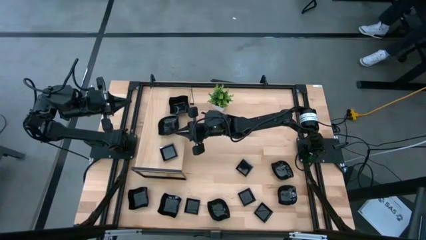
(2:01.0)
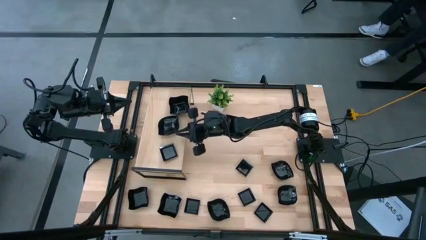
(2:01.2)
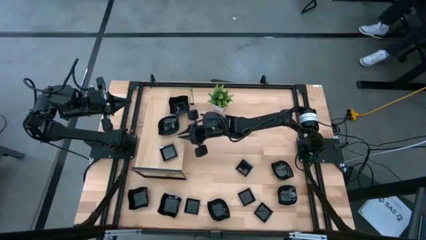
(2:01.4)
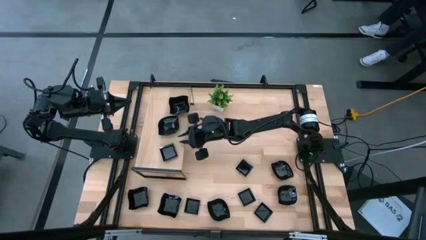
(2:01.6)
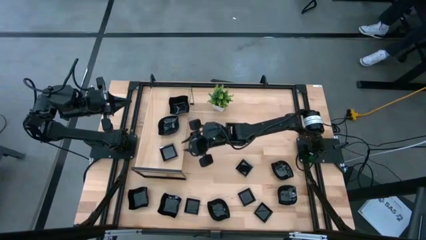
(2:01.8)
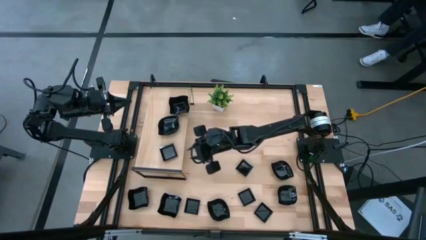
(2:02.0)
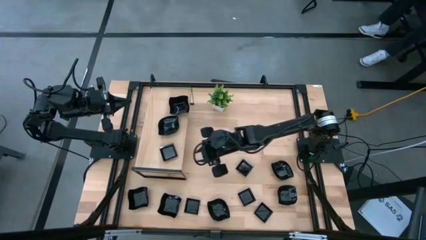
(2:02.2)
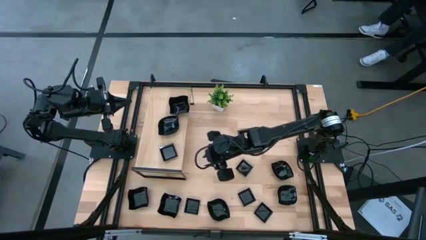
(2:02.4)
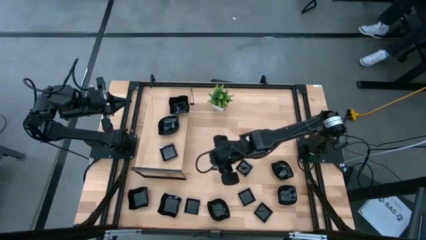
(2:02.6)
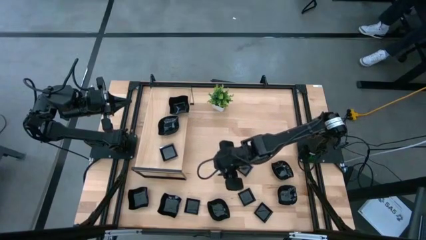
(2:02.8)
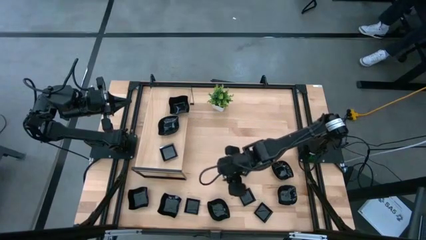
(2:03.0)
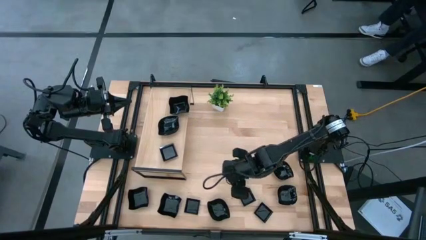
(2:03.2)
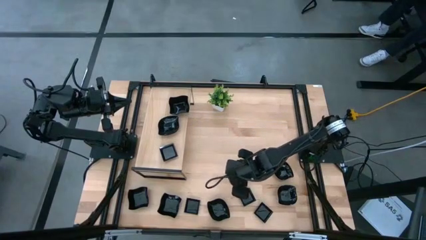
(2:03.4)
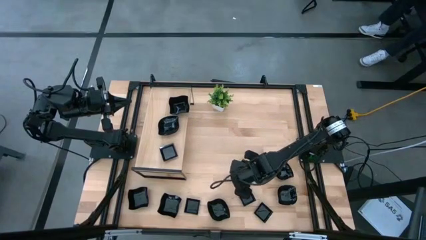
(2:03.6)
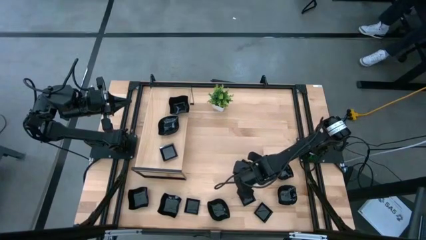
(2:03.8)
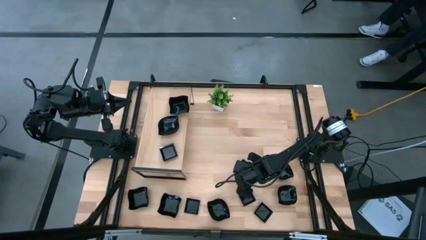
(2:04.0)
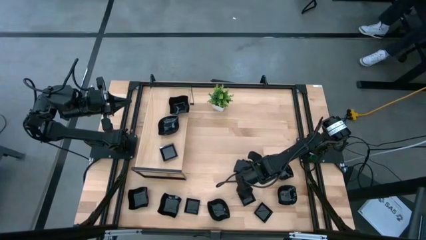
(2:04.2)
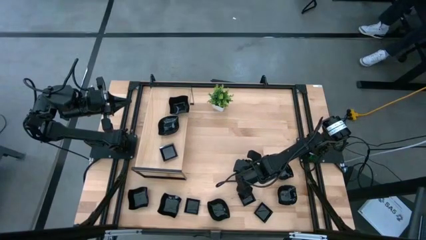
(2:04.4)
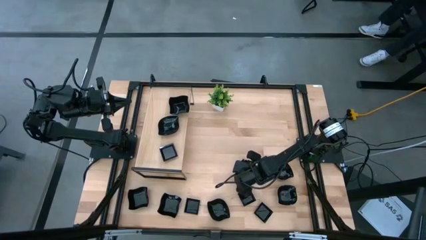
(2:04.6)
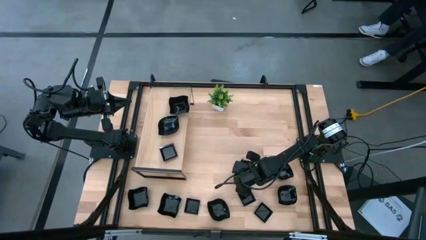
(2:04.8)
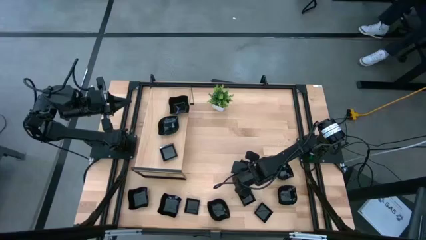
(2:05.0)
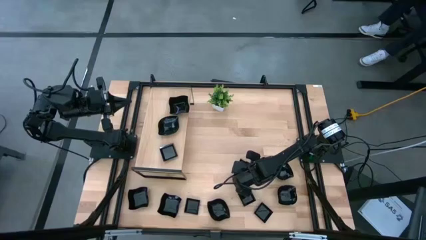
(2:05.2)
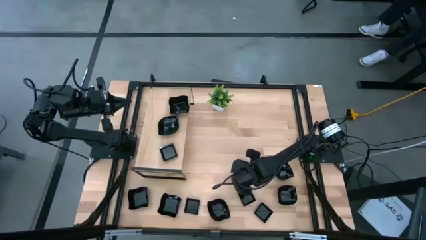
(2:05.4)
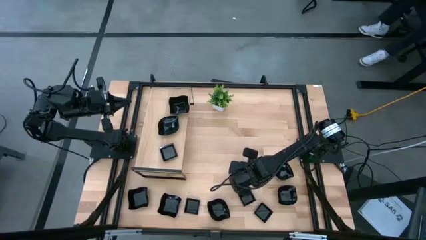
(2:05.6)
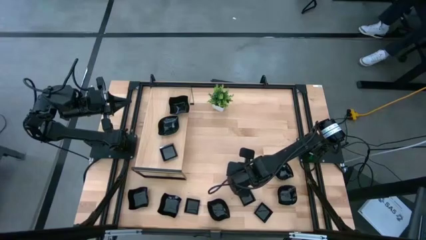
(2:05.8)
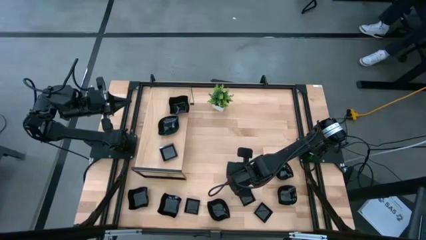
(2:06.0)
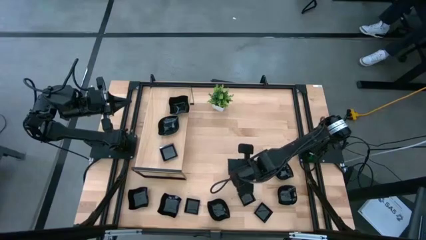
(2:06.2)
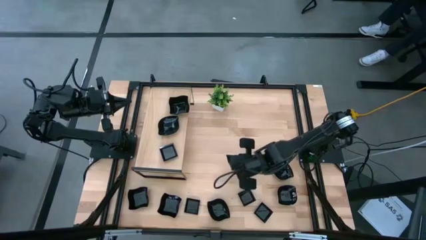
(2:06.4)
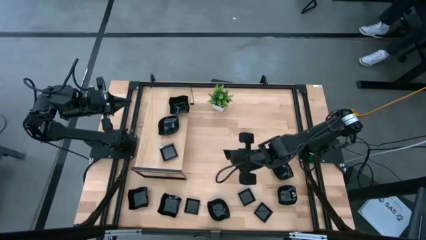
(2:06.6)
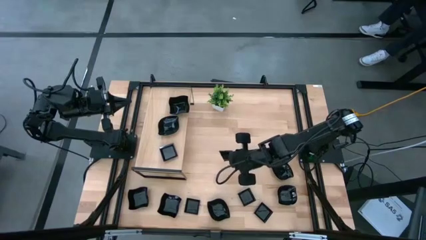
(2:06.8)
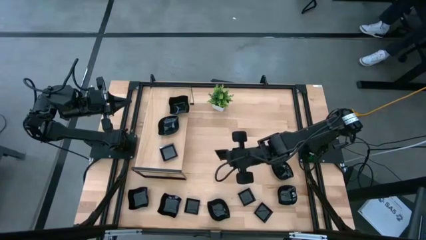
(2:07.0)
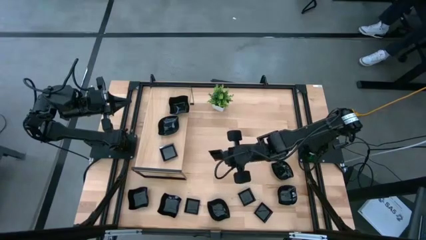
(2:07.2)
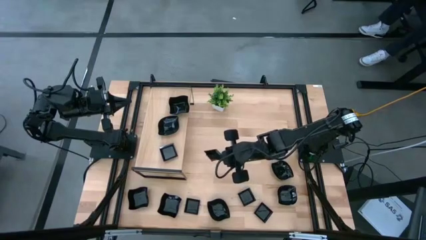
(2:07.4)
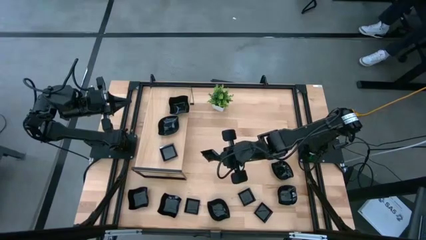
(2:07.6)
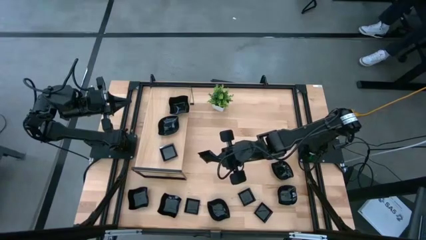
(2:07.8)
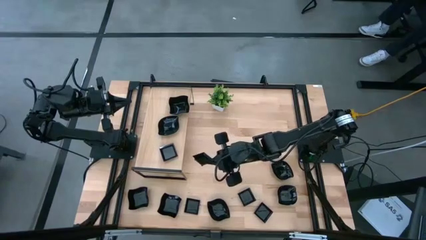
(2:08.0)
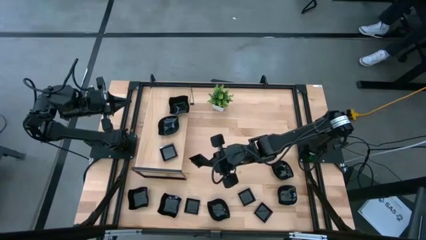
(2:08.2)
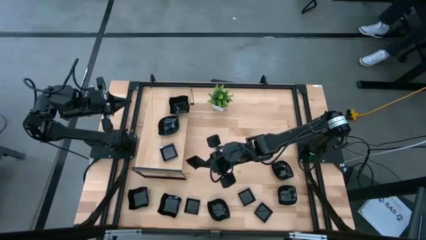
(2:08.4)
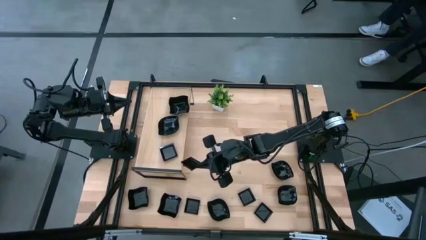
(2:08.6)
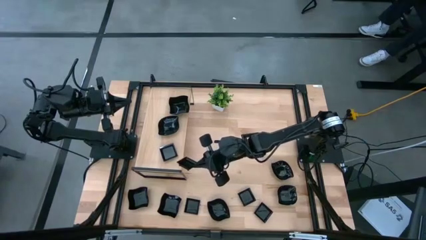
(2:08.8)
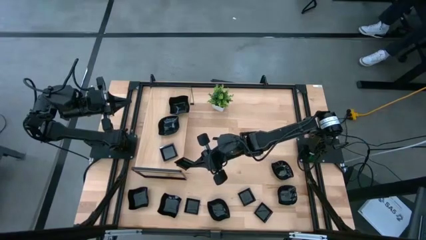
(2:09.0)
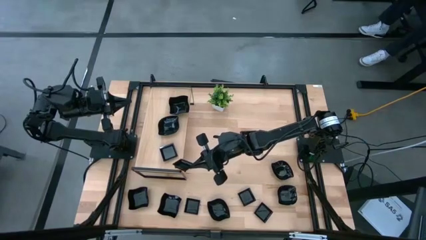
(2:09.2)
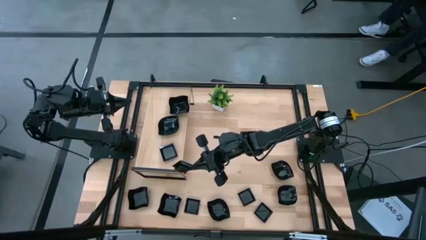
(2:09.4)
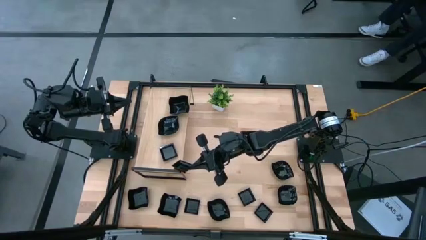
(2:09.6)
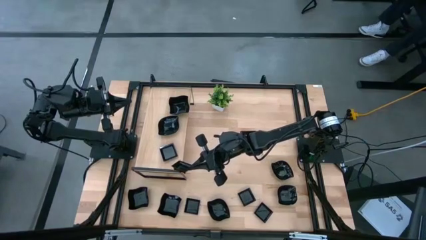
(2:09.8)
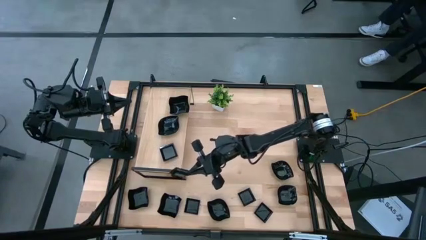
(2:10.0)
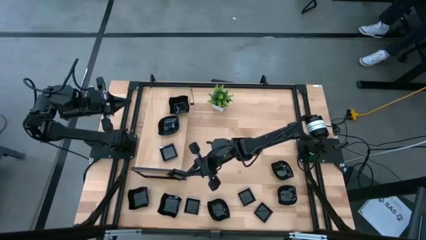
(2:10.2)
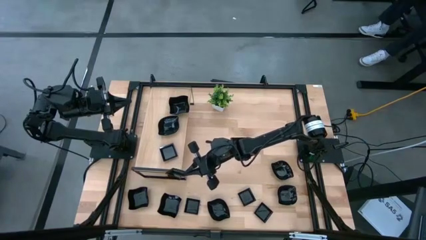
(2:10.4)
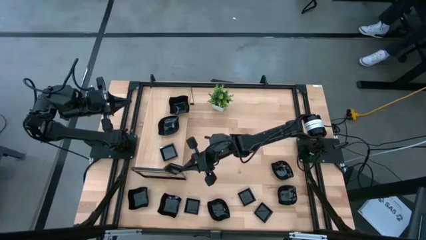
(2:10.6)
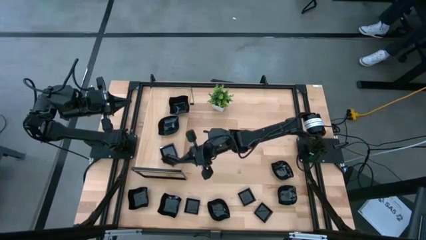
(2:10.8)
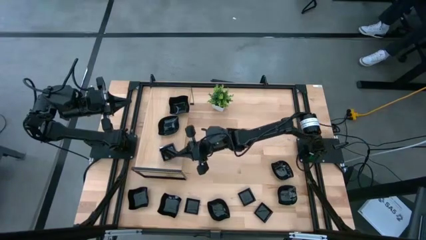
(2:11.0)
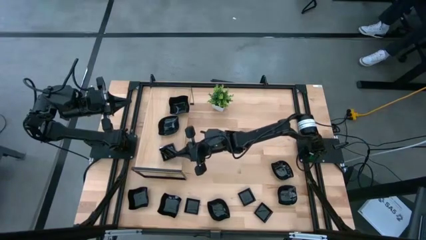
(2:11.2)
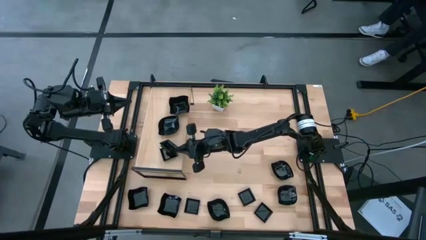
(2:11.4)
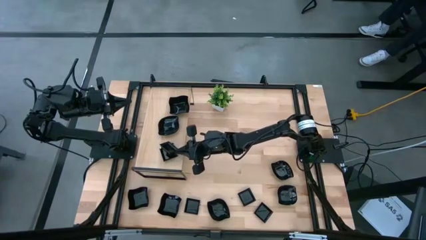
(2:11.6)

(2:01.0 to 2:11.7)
Task: Pick & Place Mini shaped plates
Stack the black square plate on top of the black square plate on the shelf

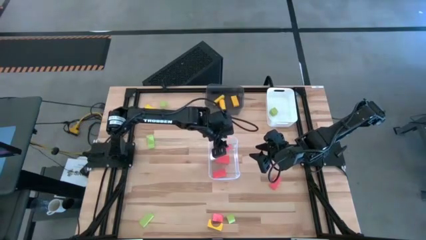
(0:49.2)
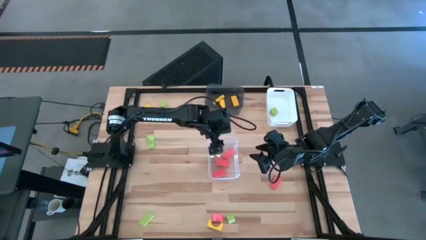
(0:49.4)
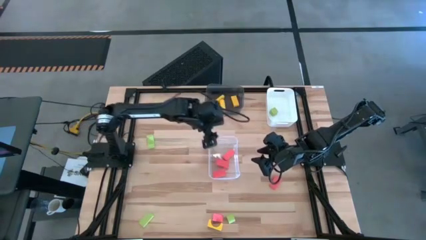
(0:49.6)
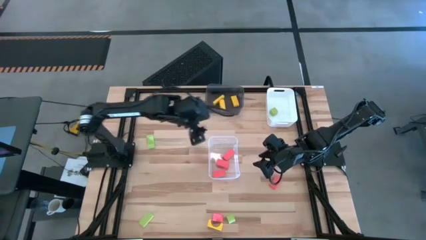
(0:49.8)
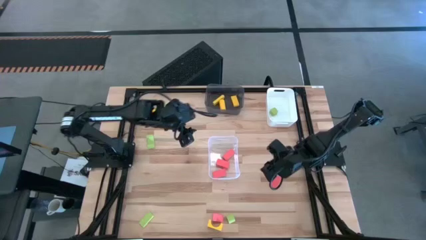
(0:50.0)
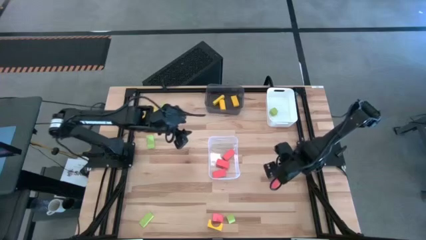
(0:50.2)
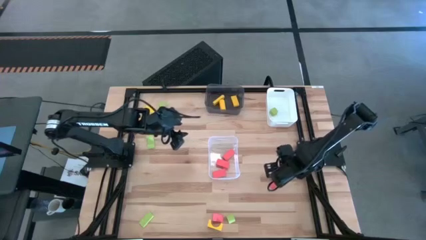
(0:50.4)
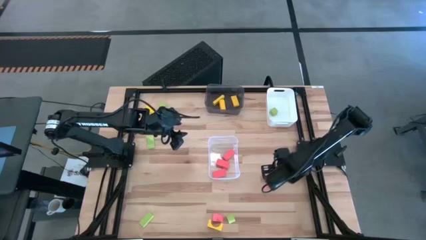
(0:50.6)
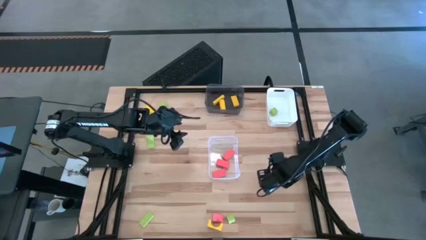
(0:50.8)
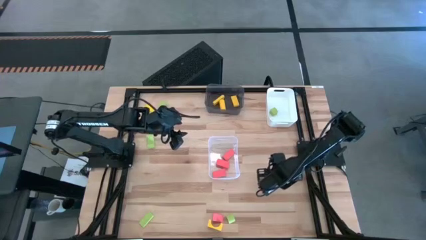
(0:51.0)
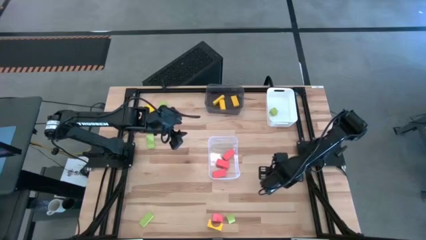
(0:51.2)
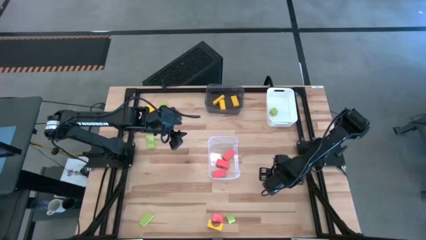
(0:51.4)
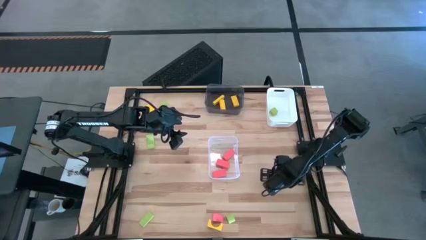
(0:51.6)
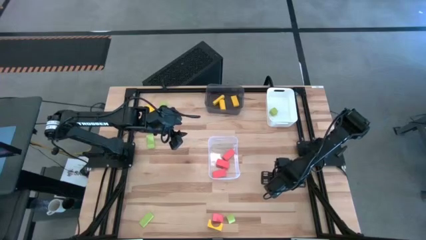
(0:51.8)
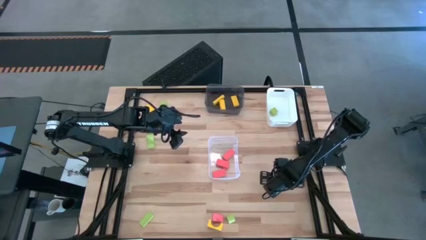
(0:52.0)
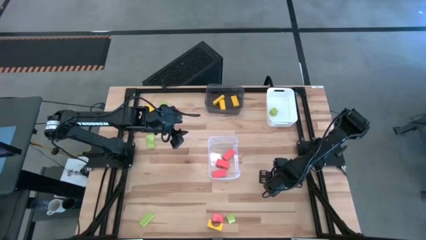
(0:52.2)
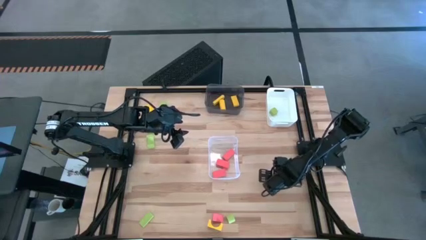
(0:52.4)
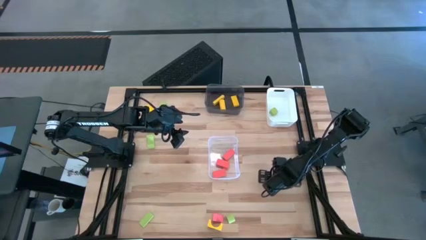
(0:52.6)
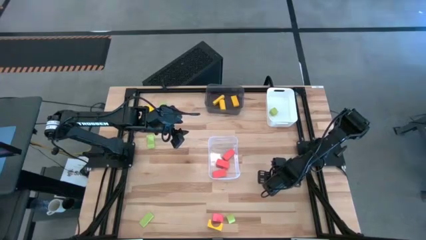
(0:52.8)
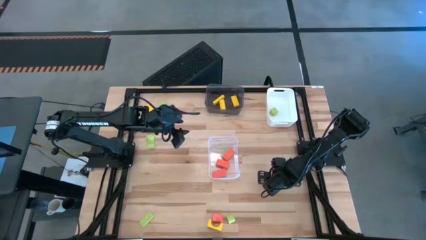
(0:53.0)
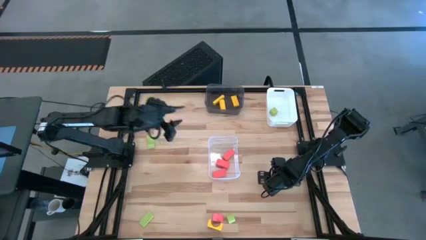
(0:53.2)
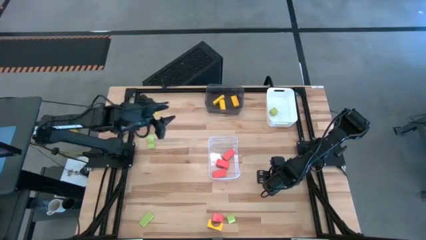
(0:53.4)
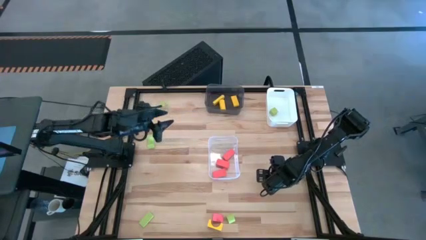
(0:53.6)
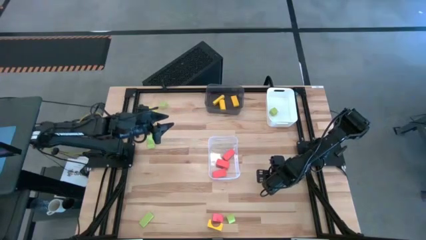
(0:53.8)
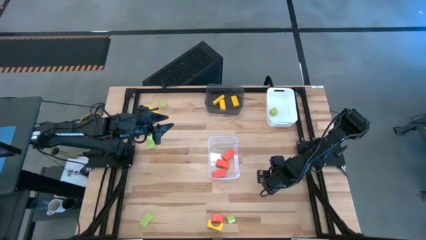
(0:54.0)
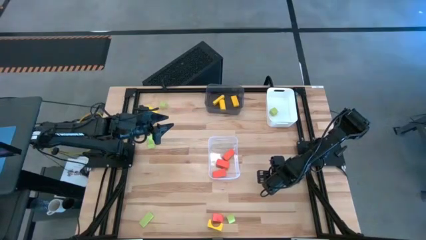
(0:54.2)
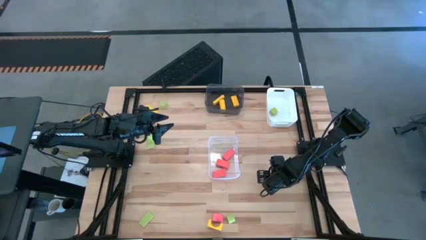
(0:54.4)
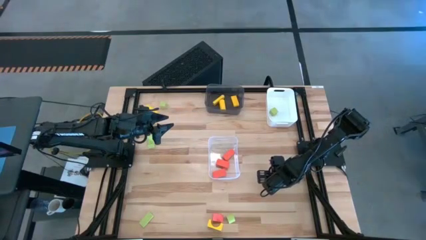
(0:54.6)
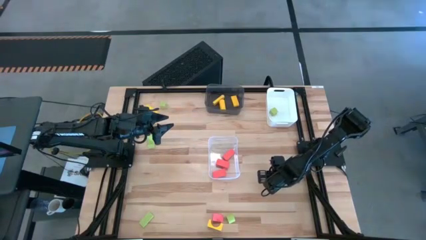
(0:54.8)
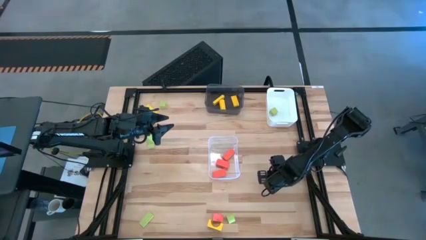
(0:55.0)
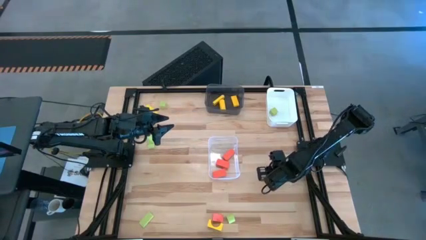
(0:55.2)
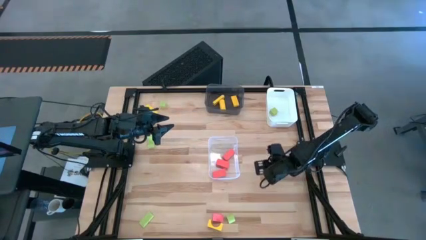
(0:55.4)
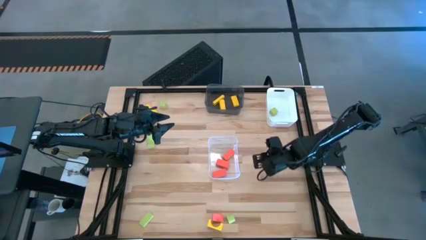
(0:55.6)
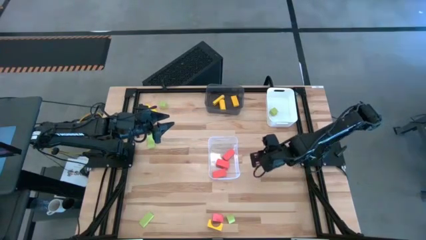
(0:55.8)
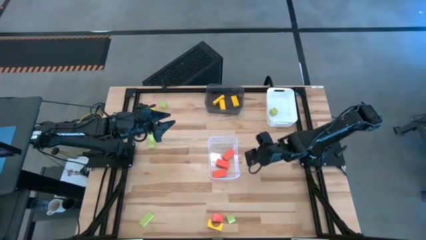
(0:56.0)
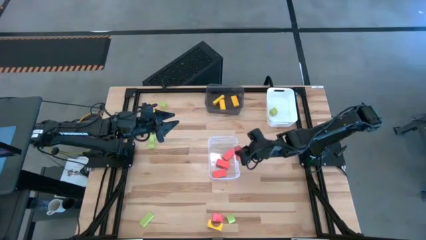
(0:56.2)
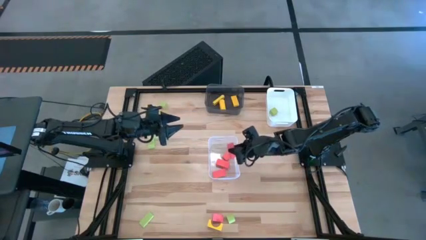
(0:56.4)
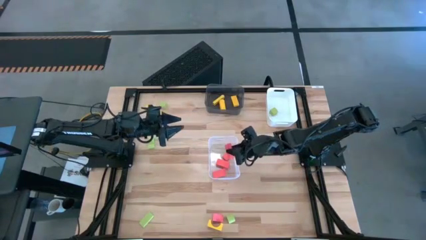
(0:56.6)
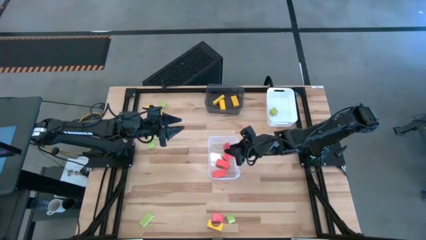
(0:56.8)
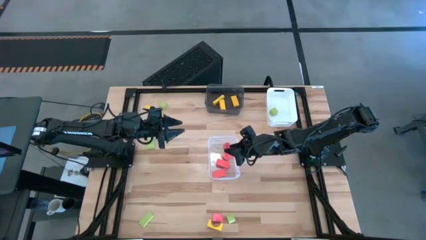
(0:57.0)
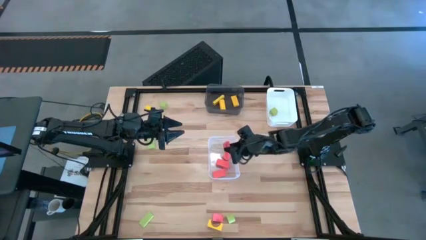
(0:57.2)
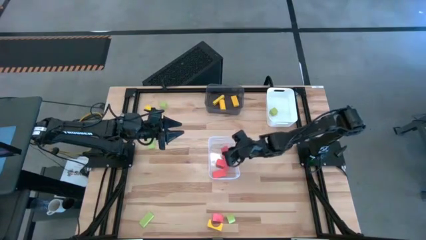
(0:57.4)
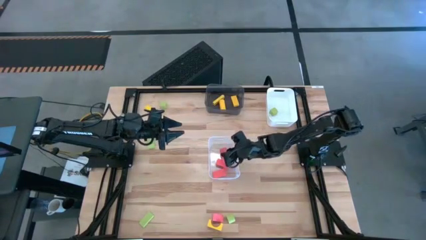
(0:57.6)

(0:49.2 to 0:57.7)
Task: Sort & place blocks by color
Put the pink block into the transparent bin
